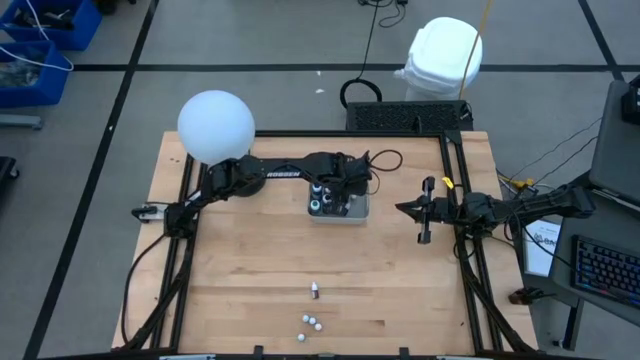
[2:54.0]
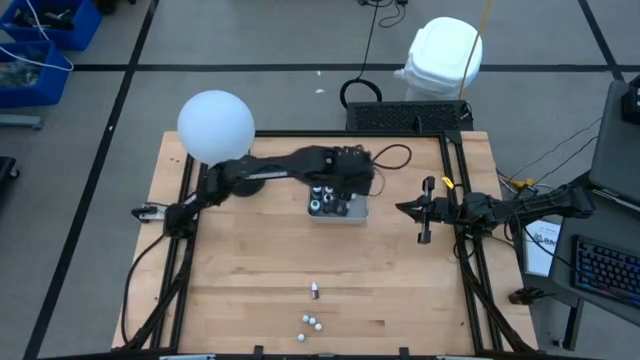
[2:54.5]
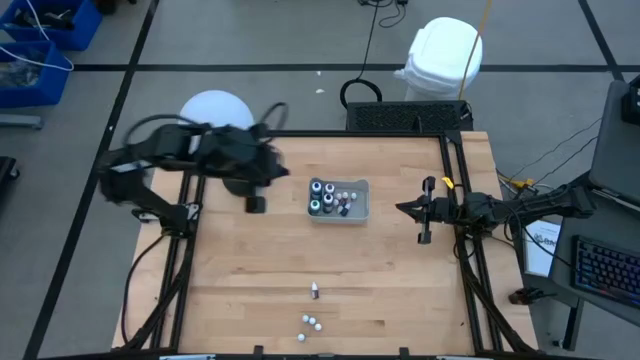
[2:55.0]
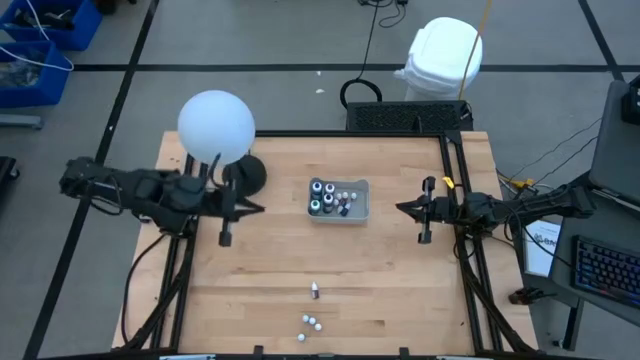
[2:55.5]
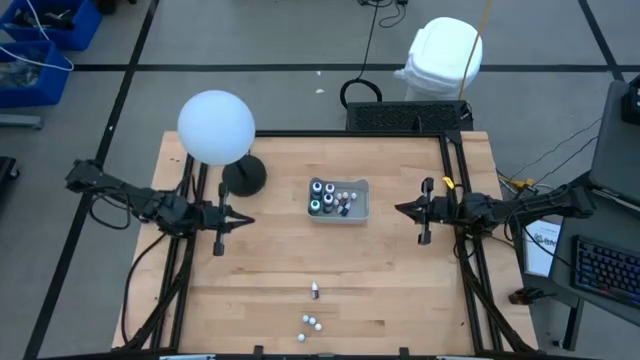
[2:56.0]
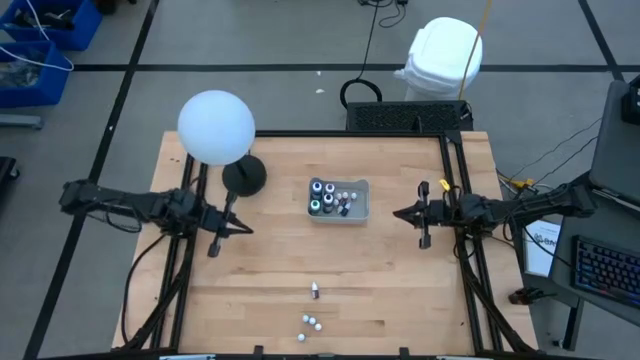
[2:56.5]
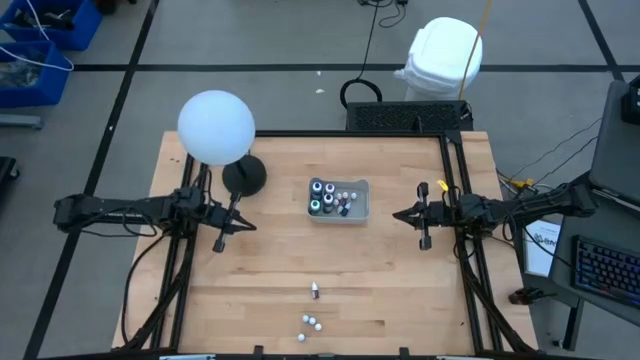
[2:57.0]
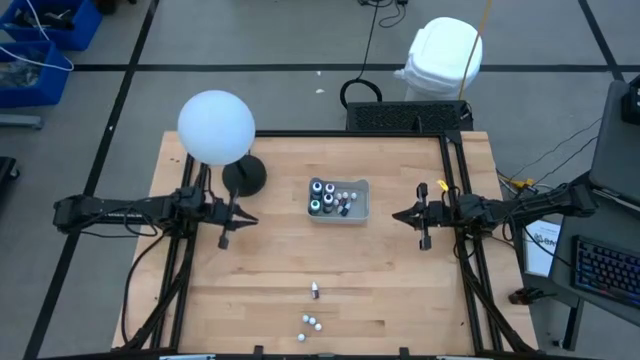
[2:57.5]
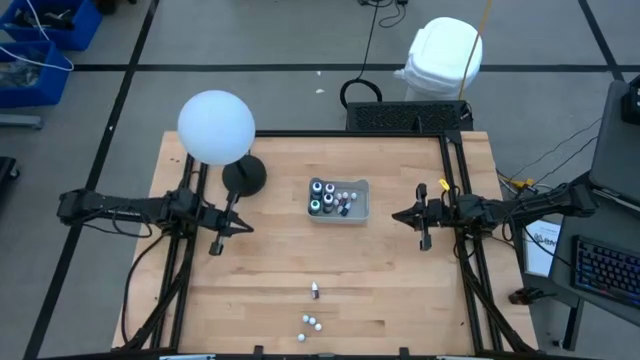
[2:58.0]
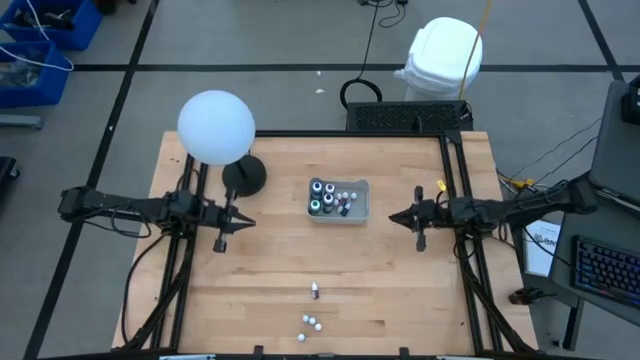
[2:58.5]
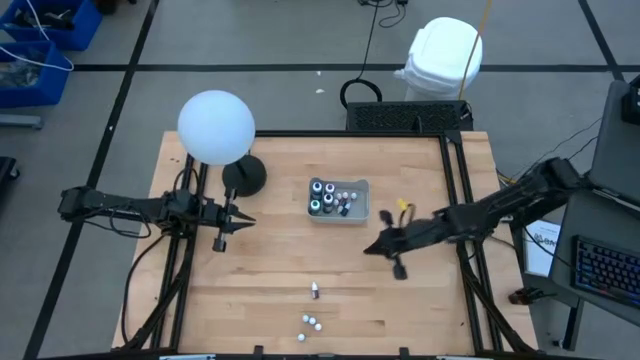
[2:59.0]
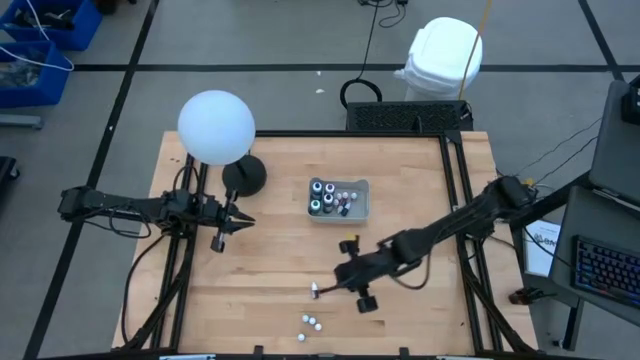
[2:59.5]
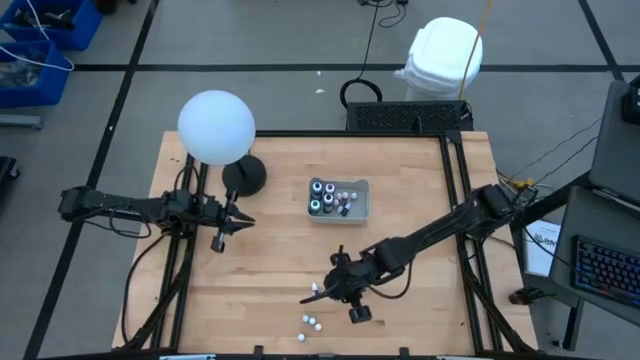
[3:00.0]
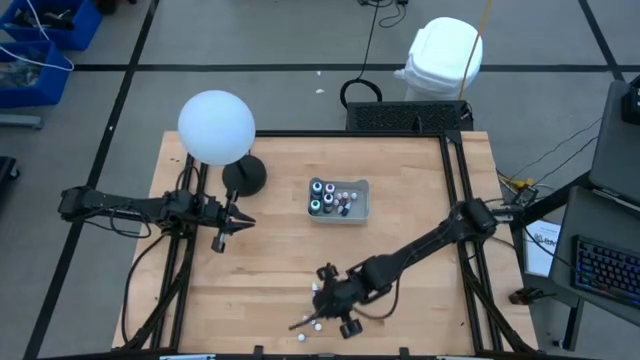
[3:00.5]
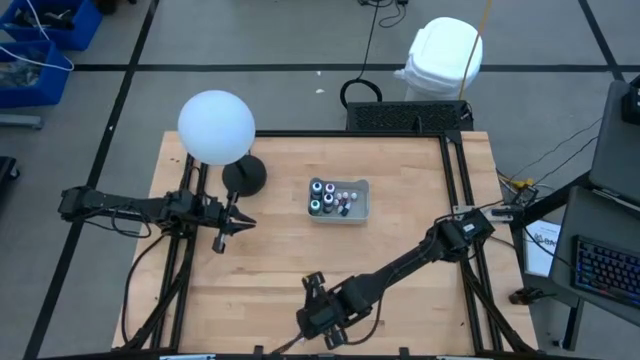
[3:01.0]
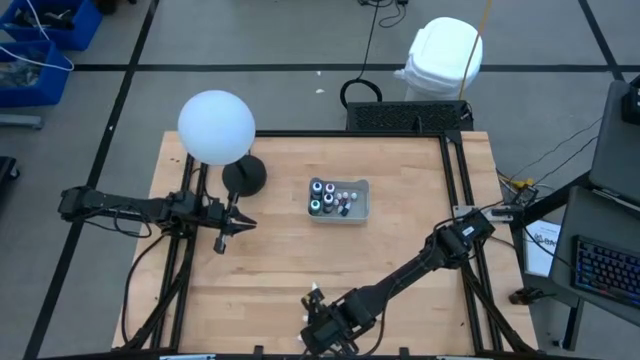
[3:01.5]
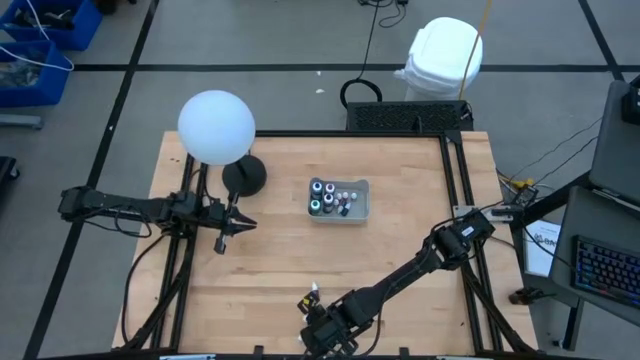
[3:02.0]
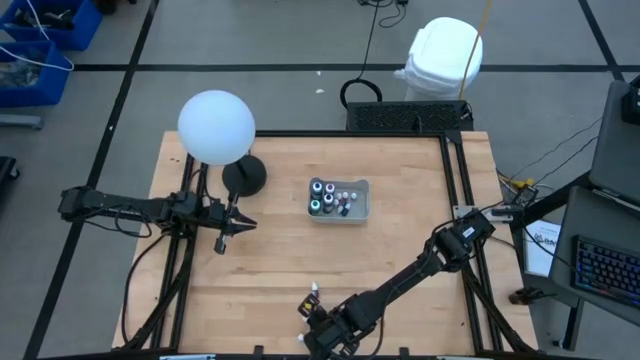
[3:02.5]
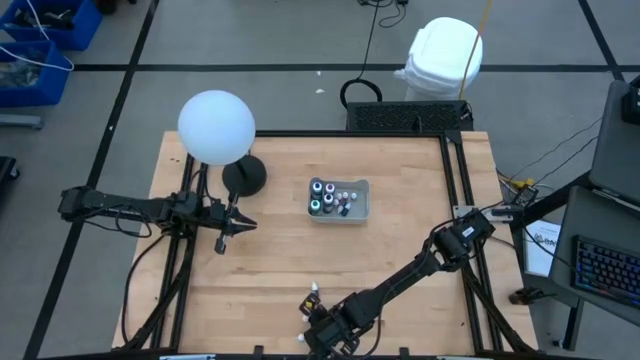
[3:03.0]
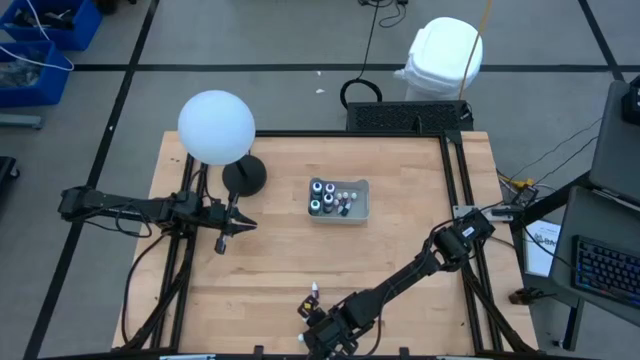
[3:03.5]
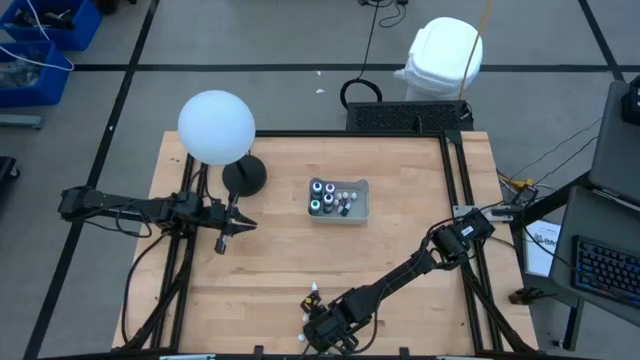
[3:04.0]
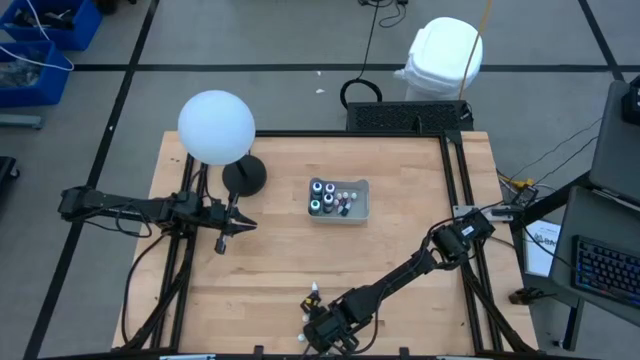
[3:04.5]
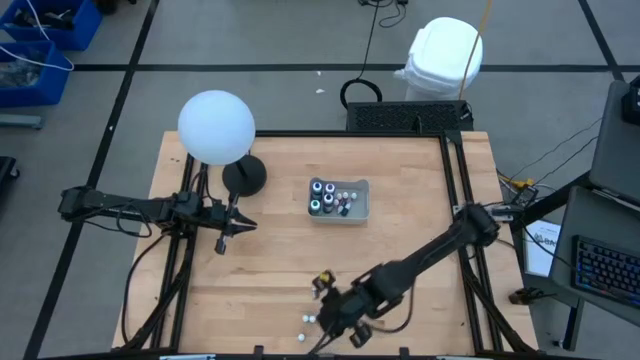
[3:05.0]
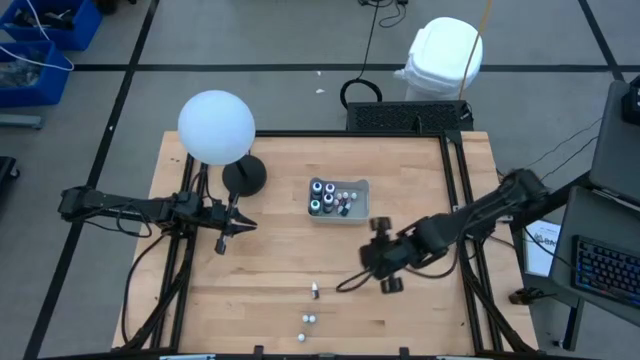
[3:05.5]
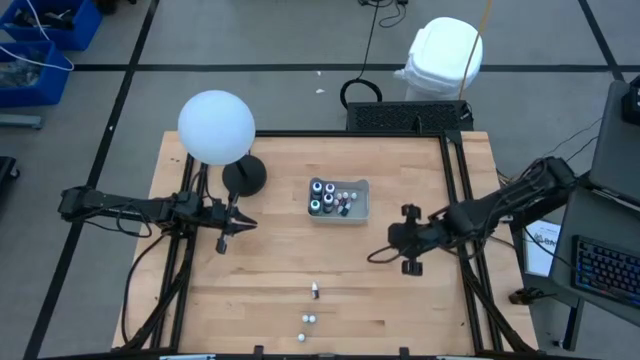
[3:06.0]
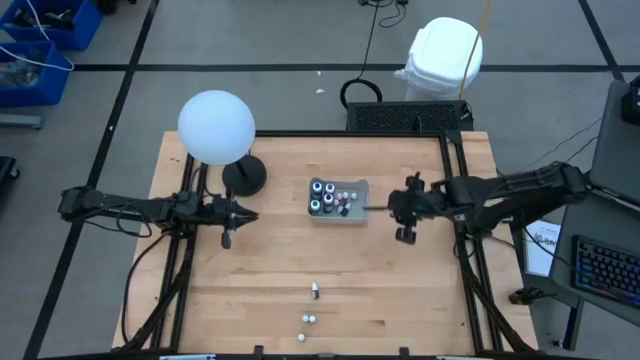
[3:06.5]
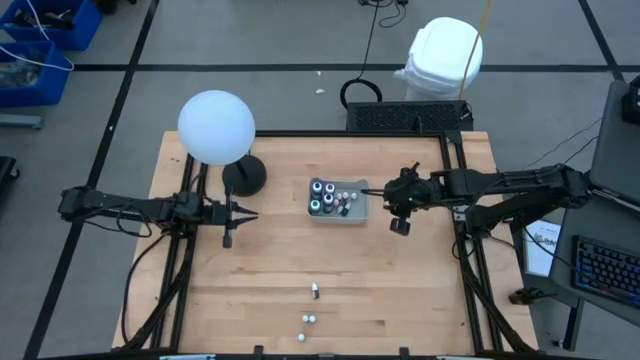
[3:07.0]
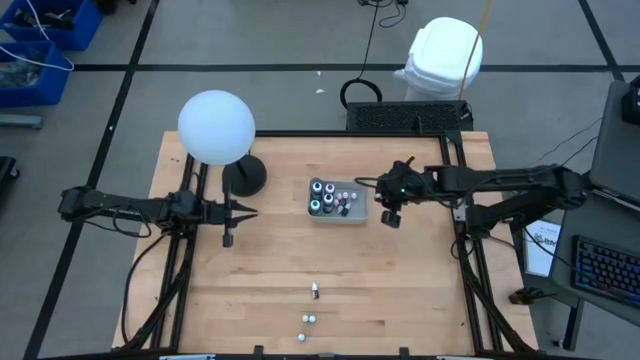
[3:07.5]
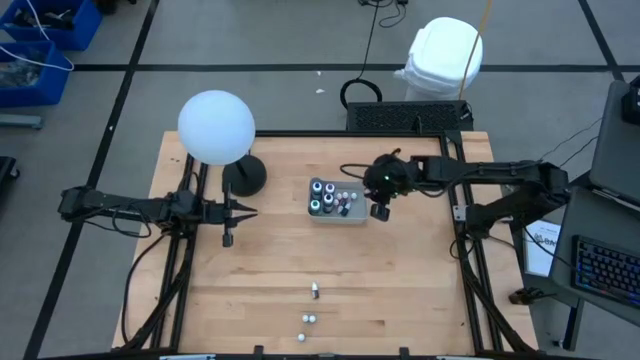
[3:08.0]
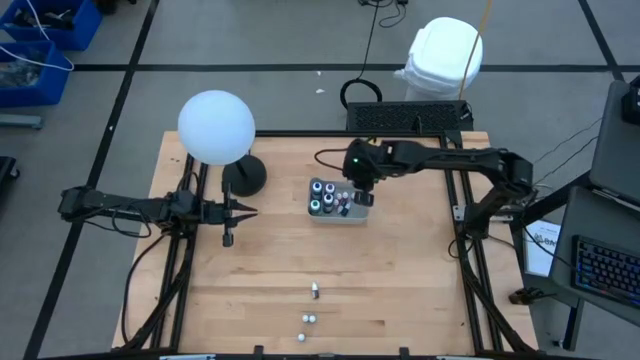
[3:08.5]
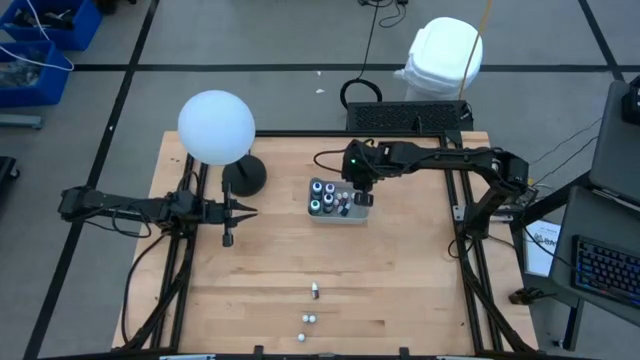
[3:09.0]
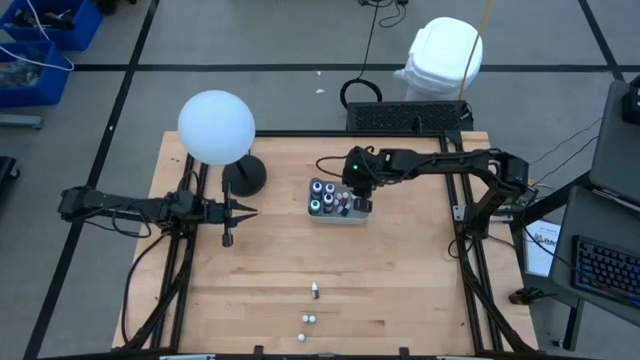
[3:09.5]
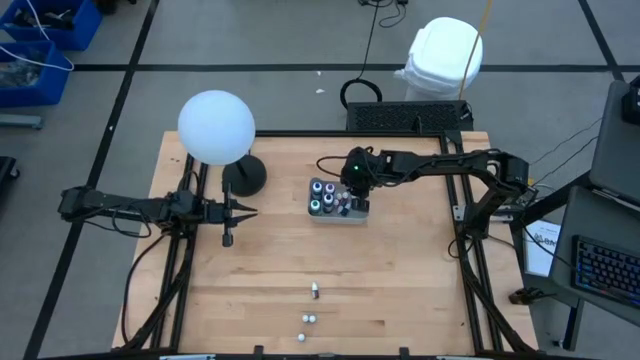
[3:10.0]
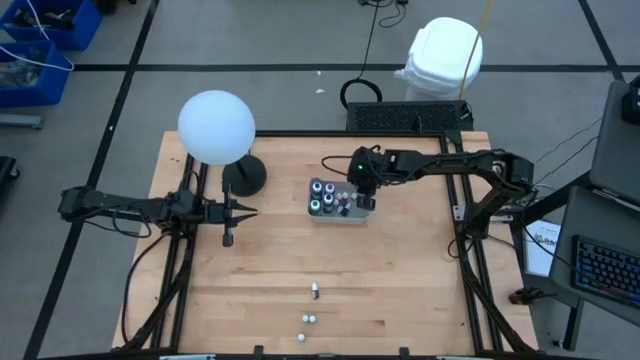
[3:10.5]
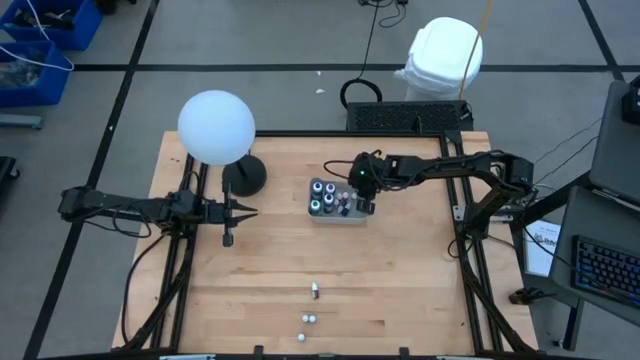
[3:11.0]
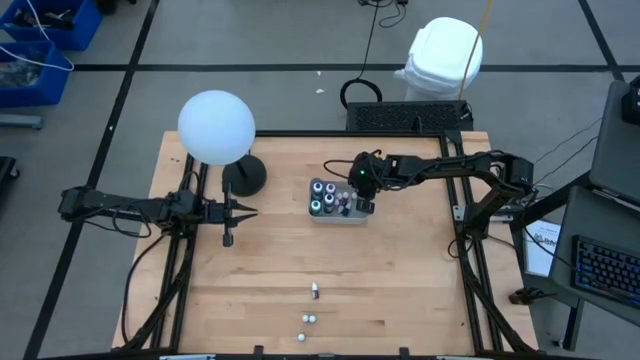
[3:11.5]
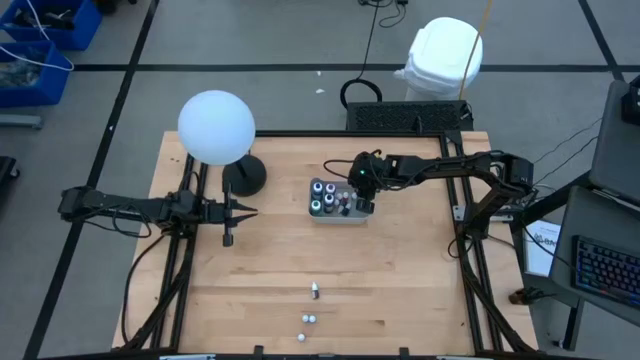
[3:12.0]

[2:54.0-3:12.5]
Task: Pick & Place food coloring
Put the small orange food coloring bottle into the gray bin

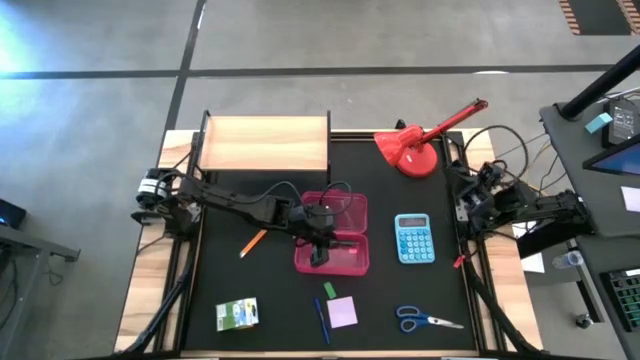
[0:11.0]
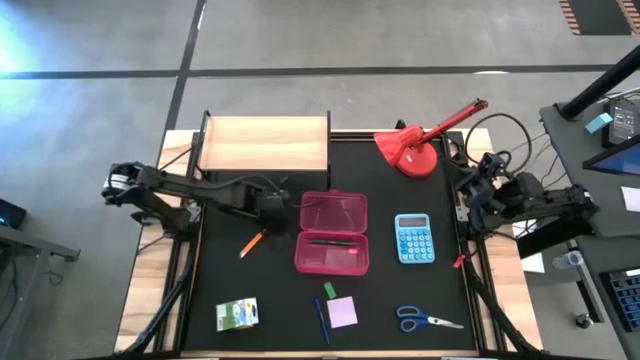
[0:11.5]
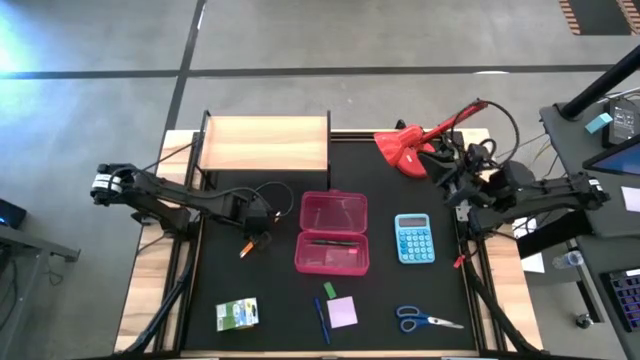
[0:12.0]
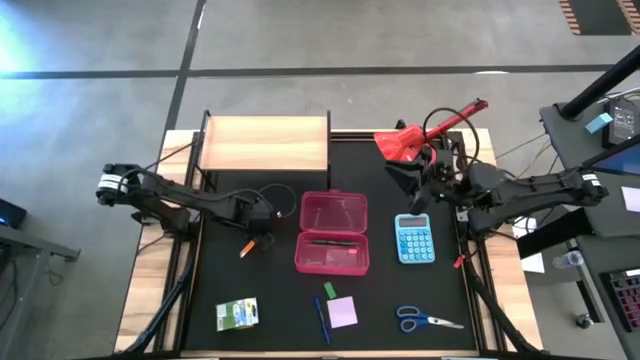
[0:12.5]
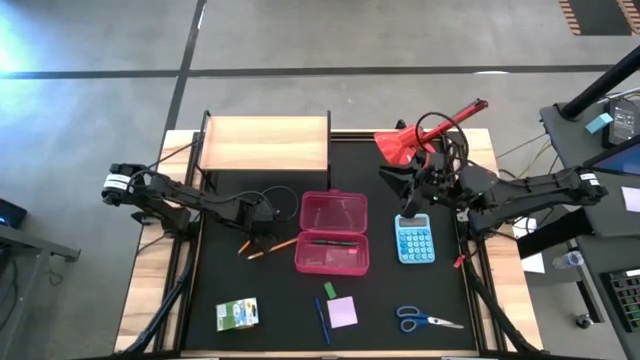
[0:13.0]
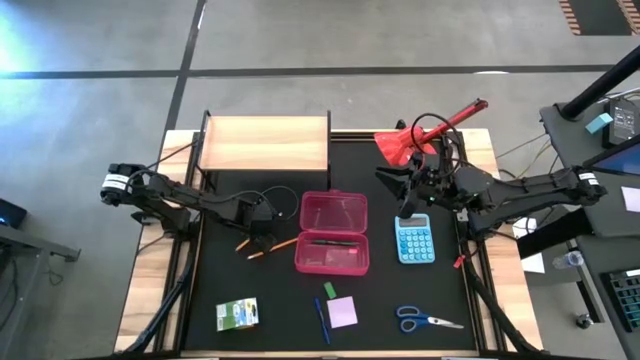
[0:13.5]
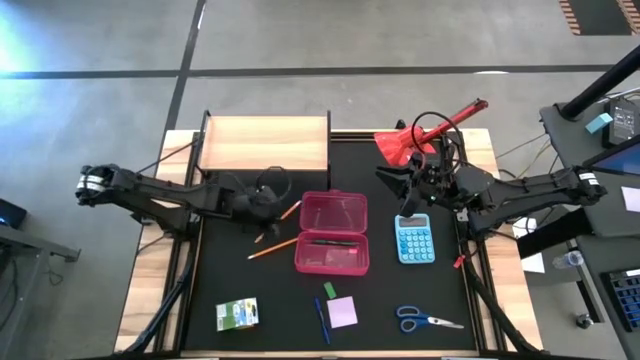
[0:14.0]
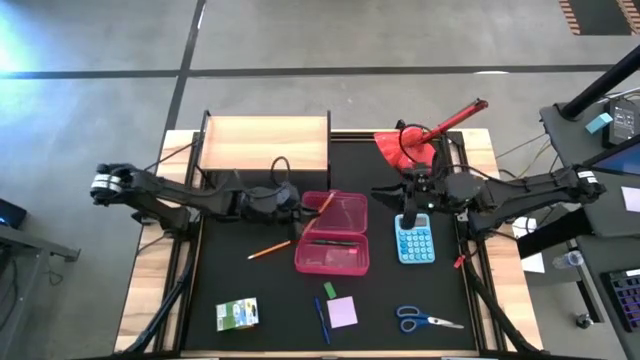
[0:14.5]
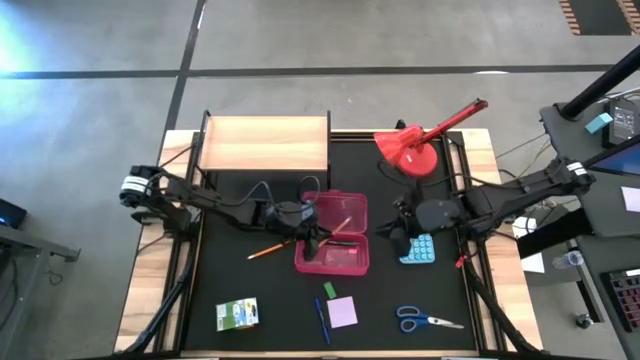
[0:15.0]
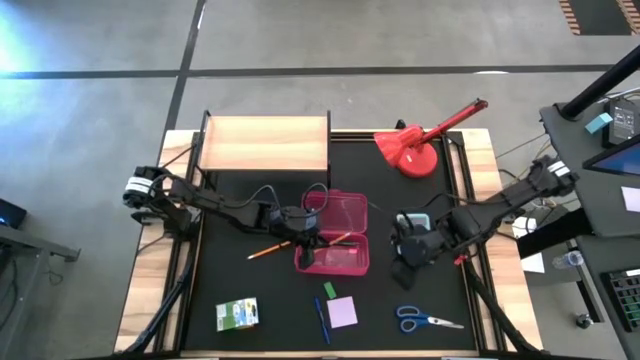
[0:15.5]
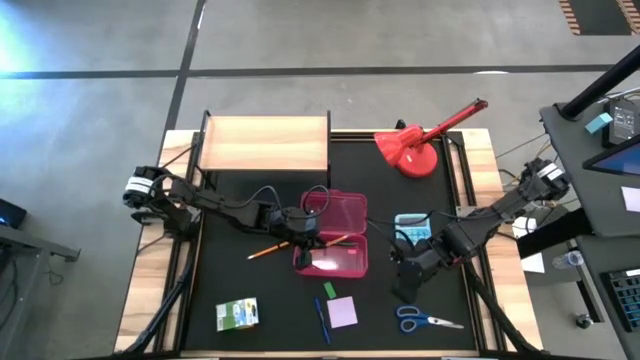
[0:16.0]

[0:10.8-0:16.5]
Task: Pack school essentials
Put the orange pencil into the pink supply box
